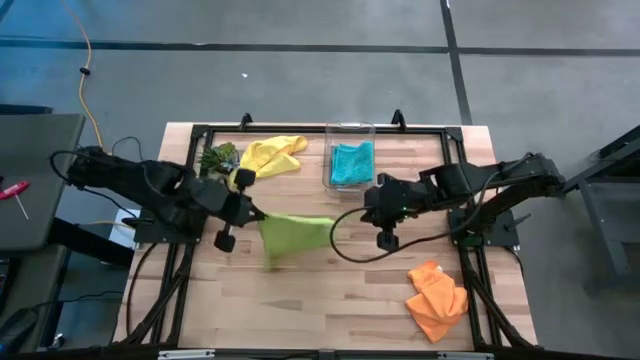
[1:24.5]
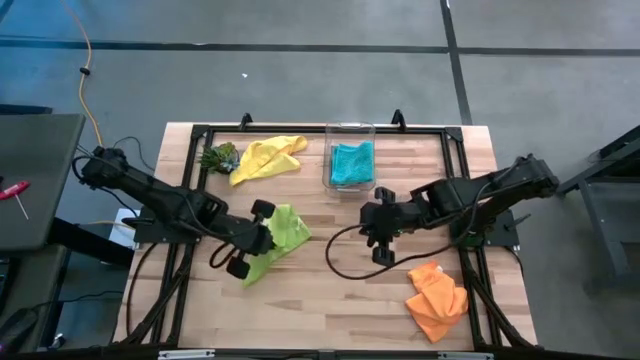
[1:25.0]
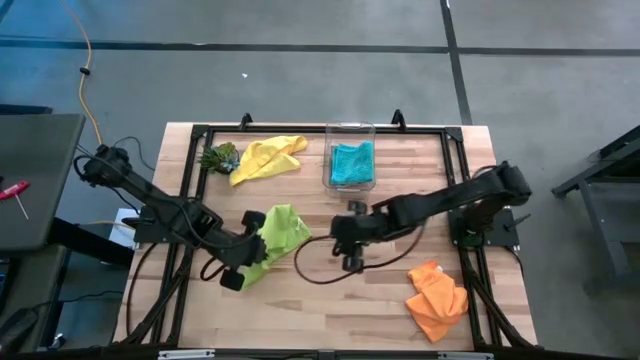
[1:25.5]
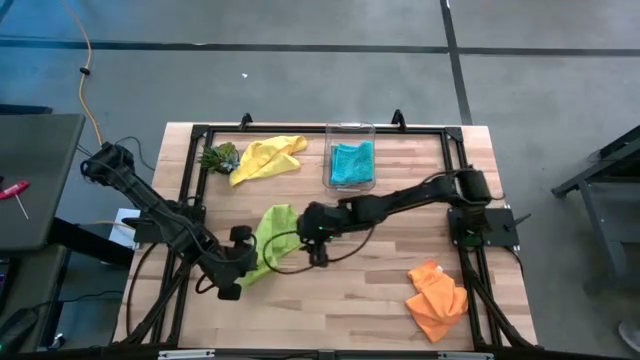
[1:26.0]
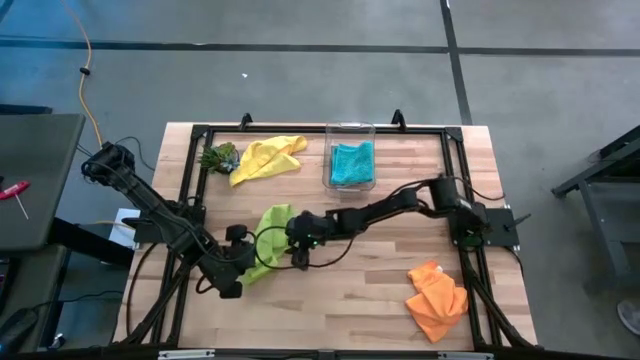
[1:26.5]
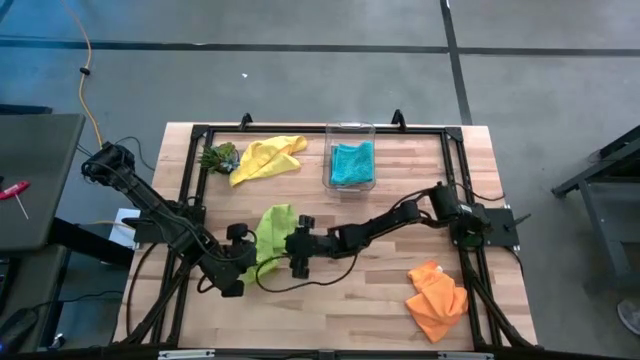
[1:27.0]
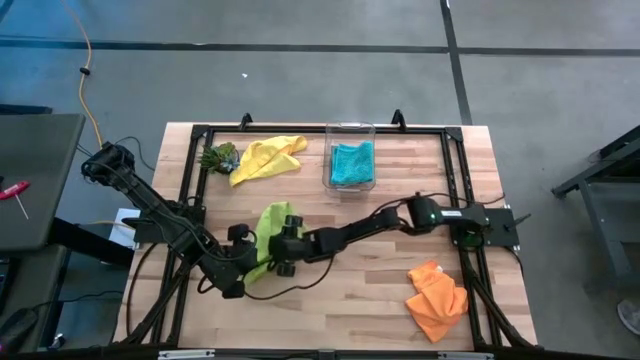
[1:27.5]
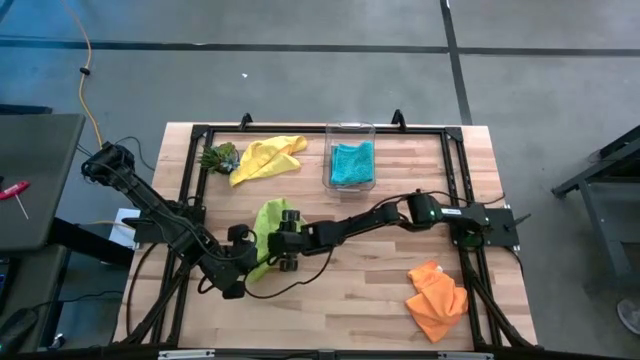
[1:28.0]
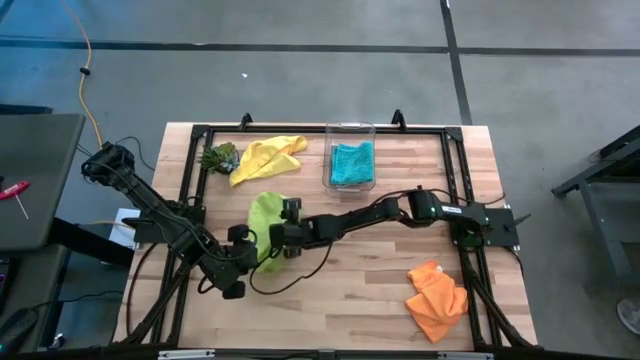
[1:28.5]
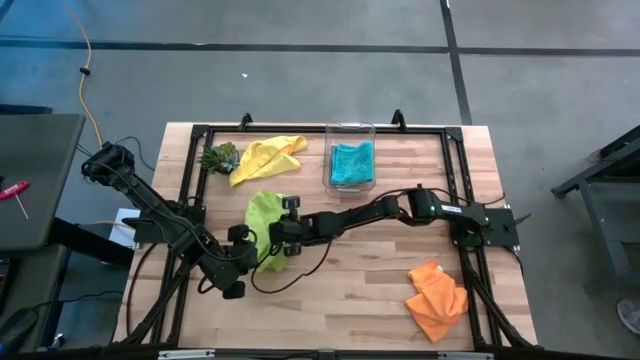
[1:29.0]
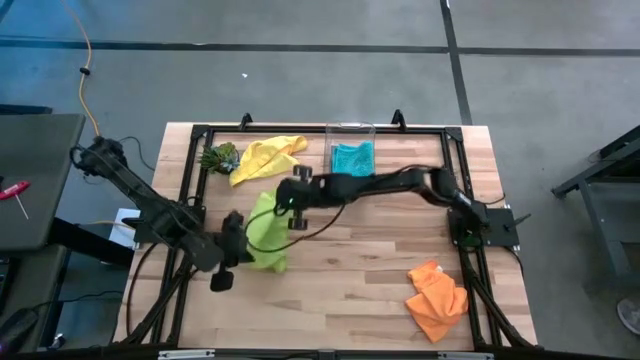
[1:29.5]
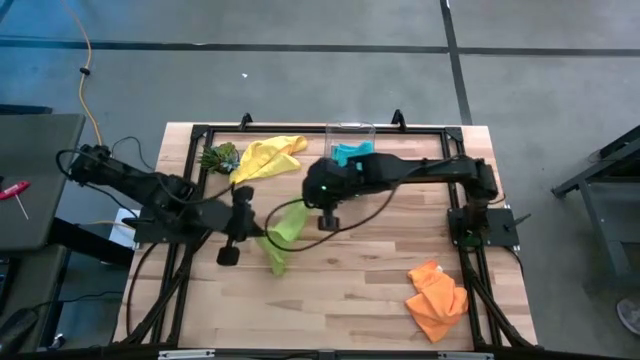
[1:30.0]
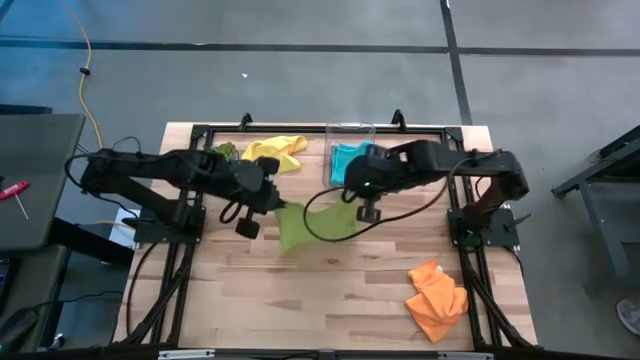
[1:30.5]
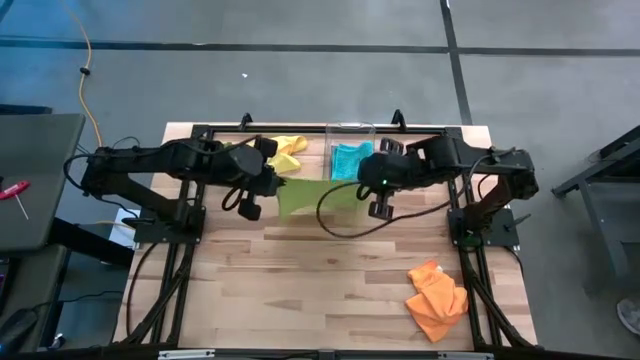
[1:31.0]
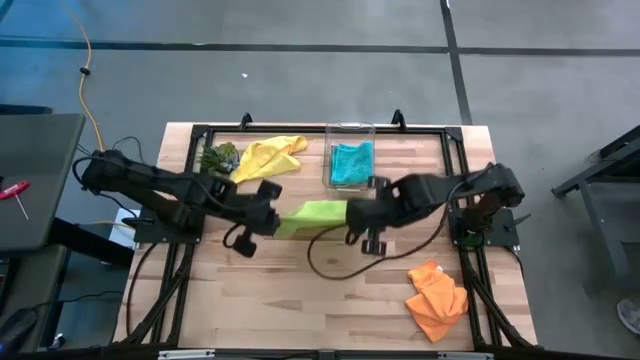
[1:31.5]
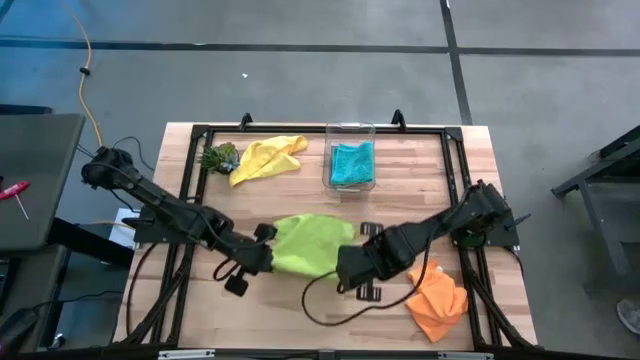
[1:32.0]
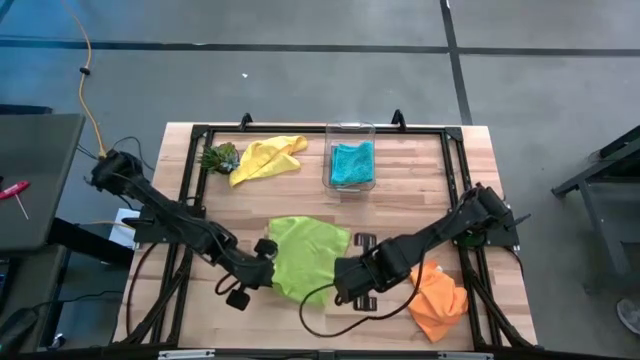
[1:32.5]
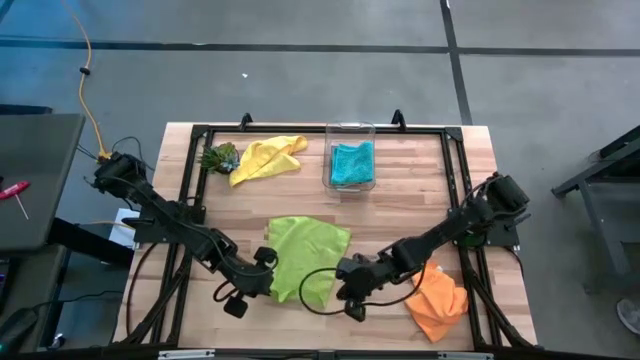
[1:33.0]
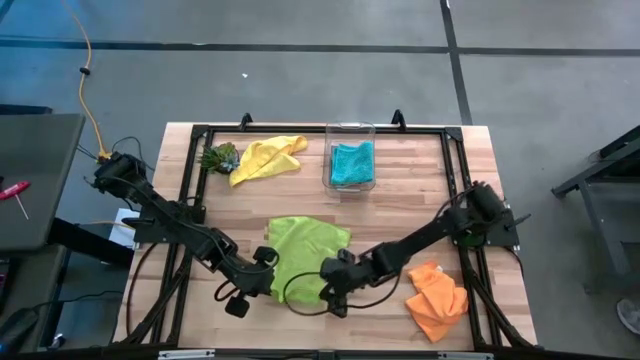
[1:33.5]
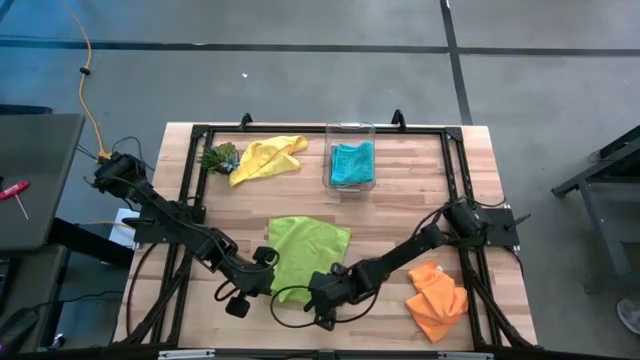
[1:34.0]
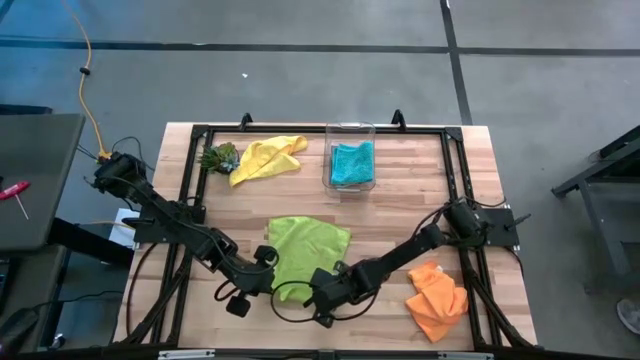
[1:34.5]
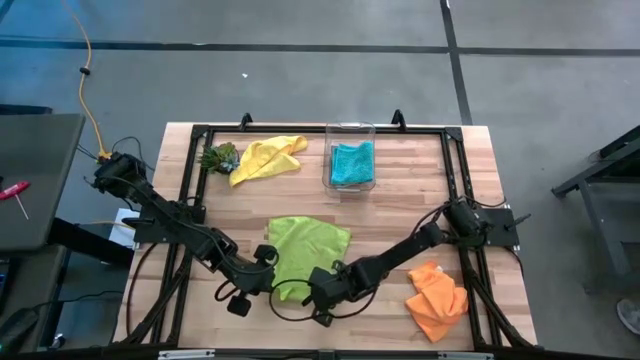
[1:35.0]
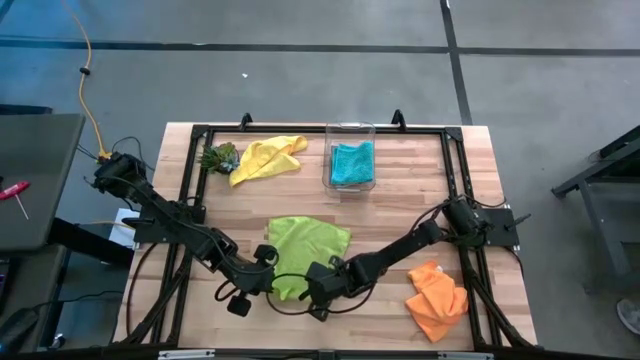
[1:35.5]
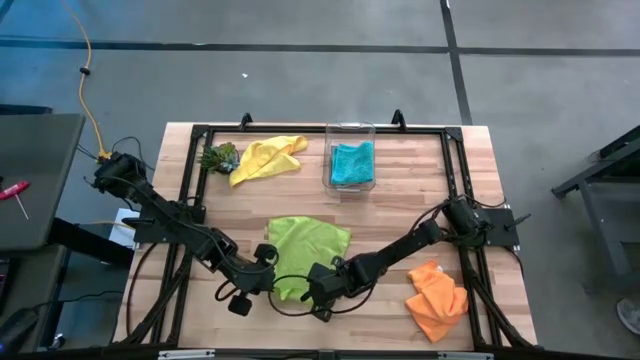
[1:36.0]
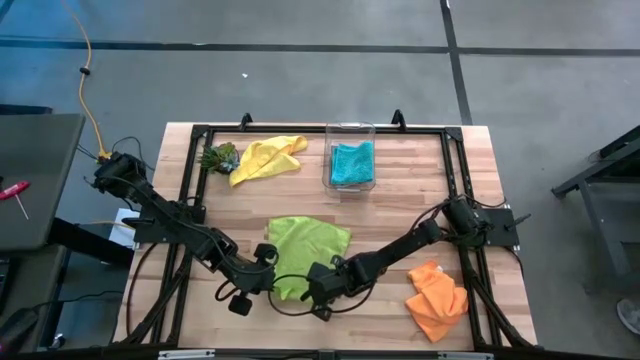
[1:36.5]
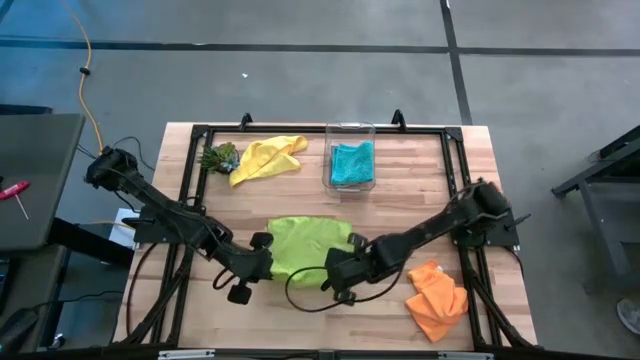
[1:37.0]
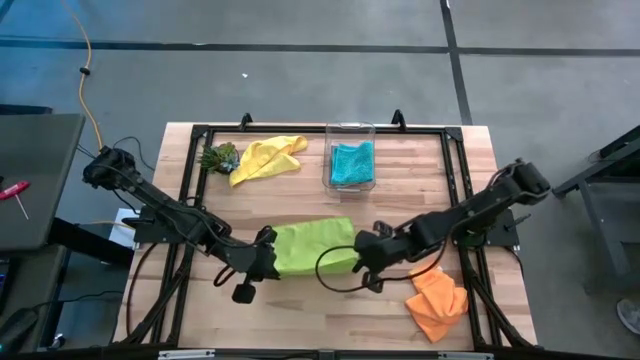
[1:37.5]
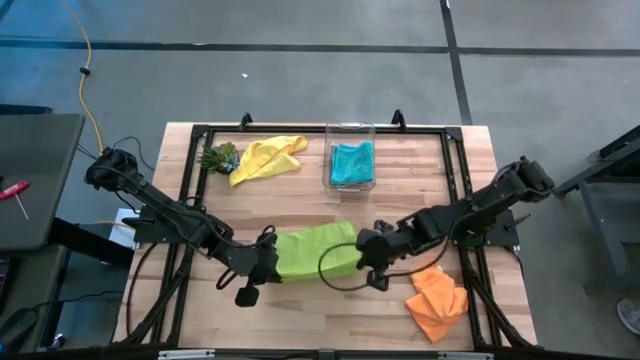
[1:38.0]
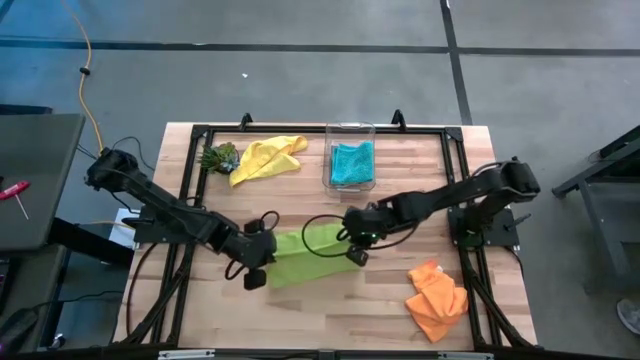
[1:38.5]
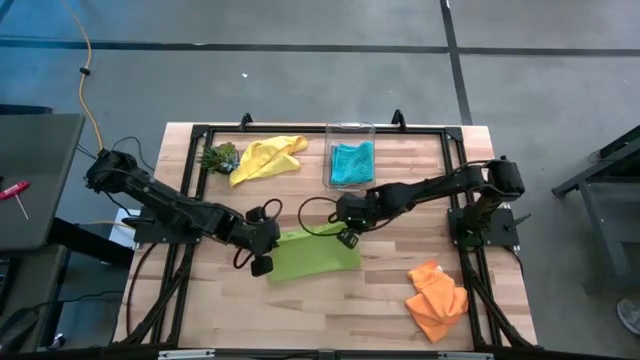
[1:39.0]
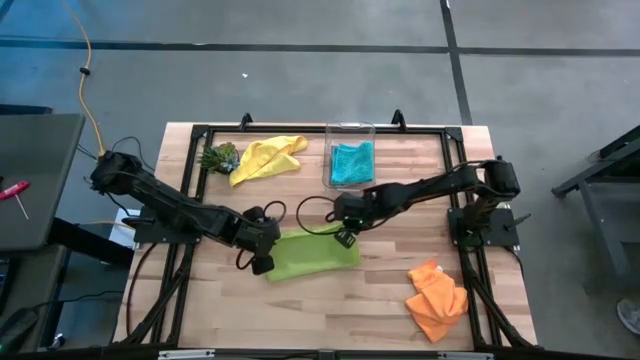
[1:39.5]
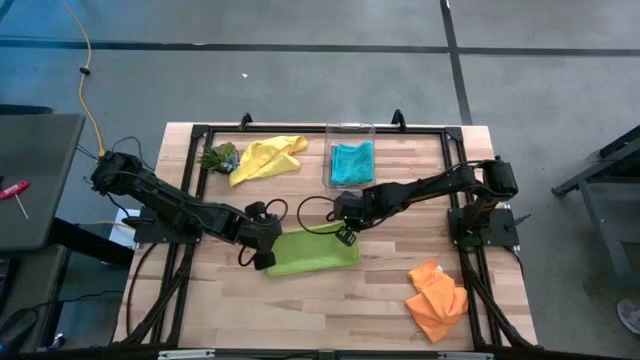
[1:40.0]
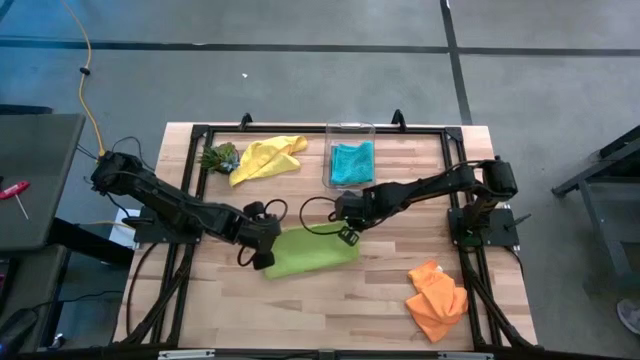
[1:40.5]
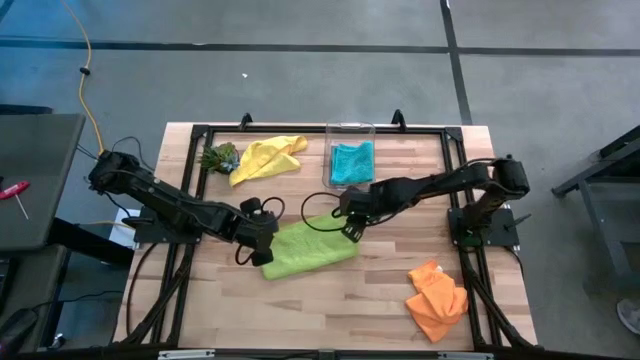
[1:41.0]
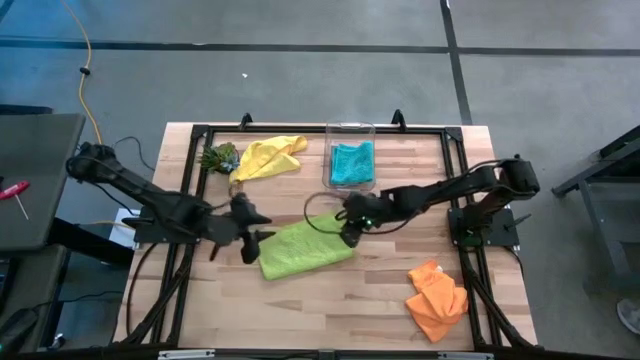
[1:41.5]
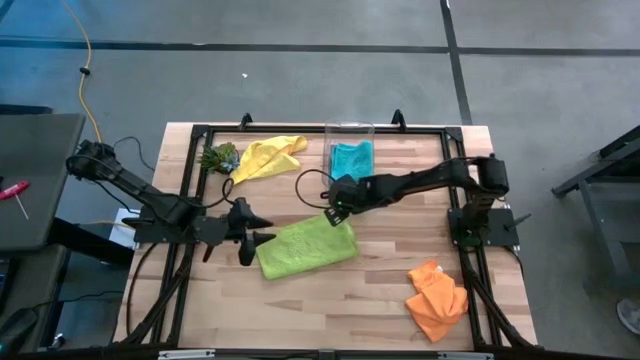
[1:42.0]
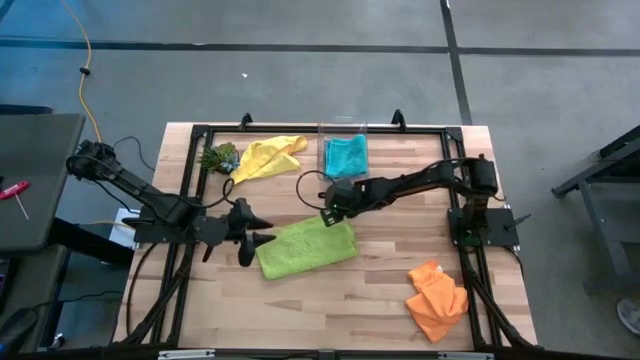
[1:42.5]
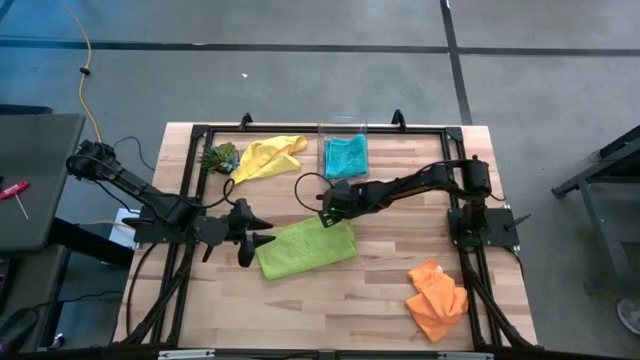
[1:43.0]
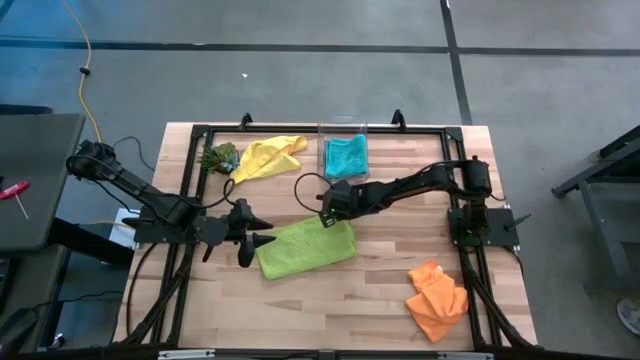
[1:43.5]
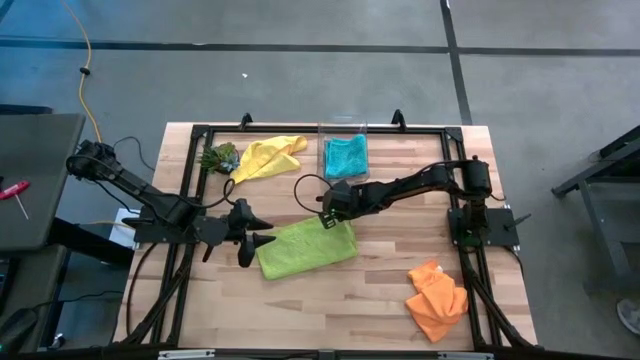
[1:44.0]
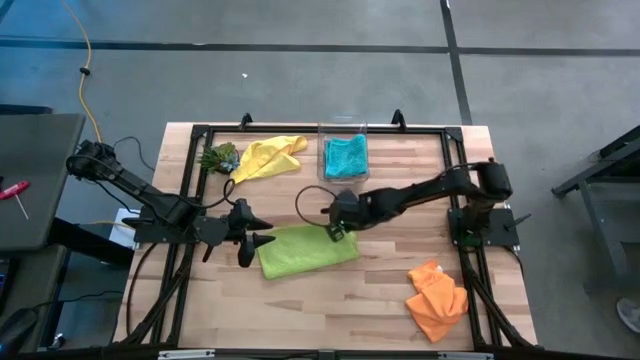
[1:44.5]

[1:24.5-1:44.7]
Task: Fold microfiber towels
Fold the green microfiber cloth
